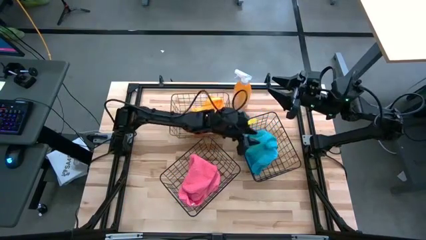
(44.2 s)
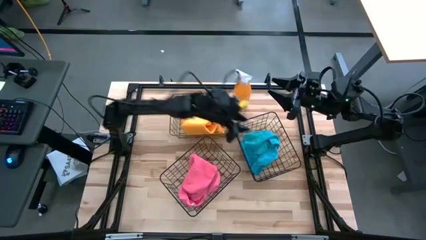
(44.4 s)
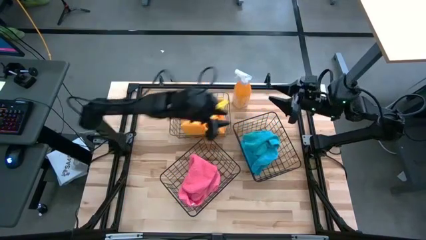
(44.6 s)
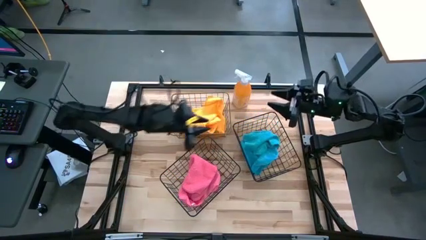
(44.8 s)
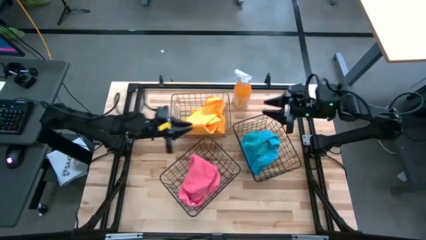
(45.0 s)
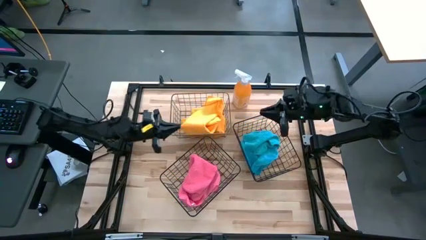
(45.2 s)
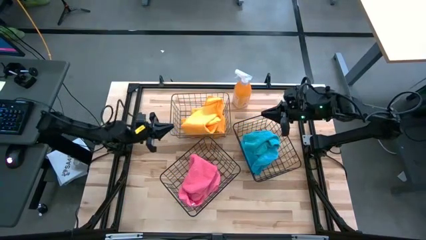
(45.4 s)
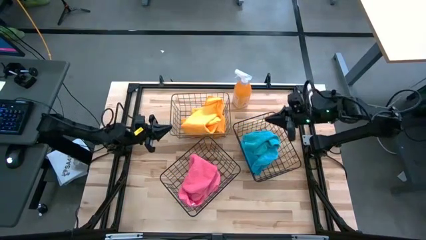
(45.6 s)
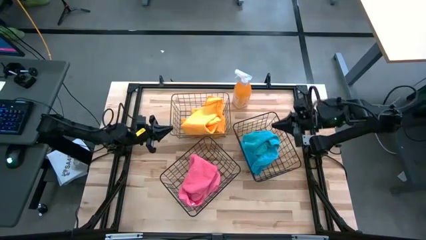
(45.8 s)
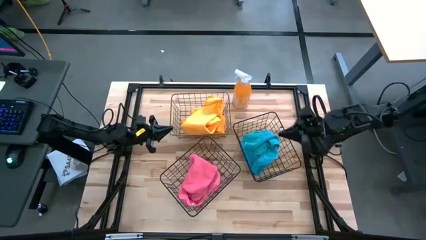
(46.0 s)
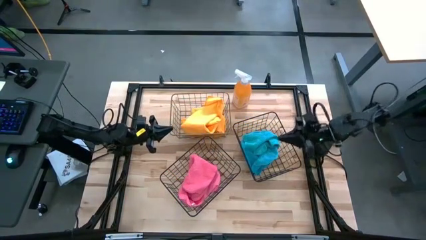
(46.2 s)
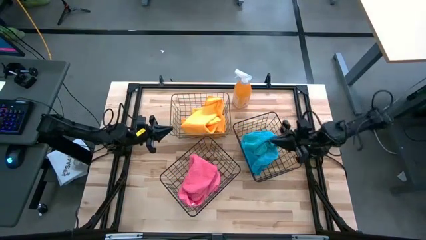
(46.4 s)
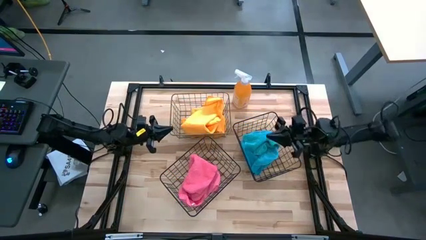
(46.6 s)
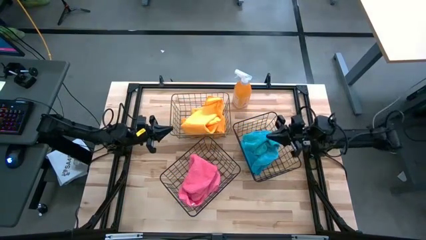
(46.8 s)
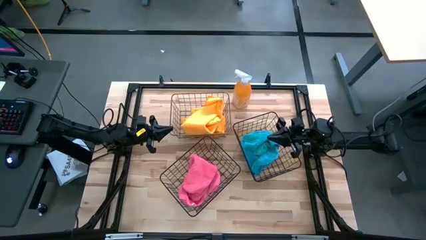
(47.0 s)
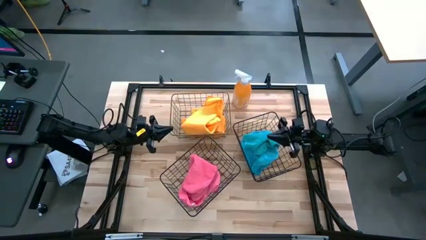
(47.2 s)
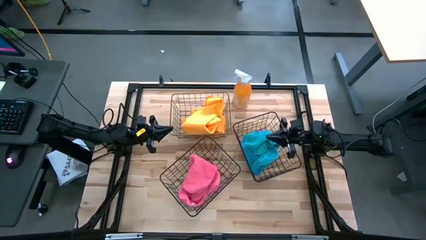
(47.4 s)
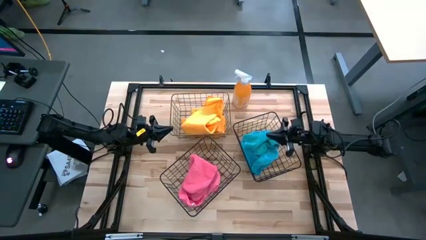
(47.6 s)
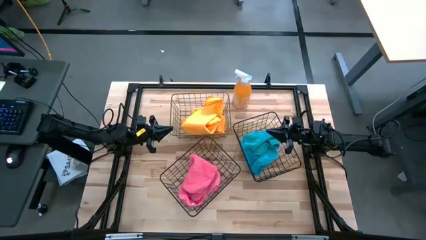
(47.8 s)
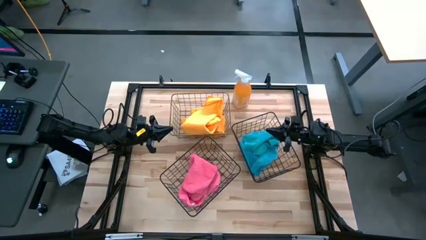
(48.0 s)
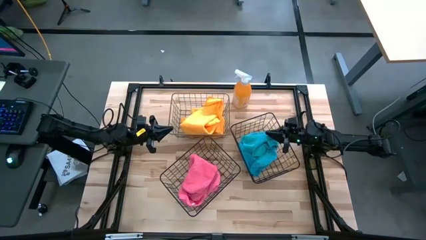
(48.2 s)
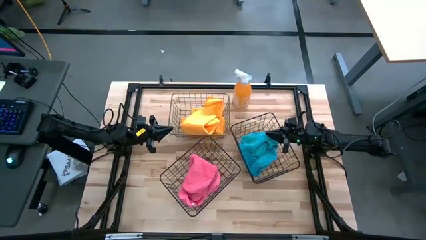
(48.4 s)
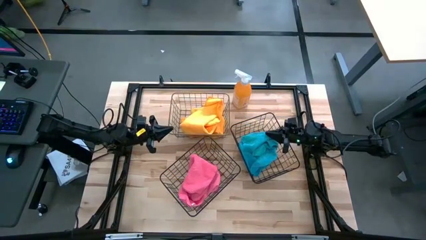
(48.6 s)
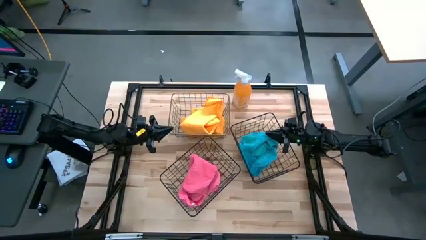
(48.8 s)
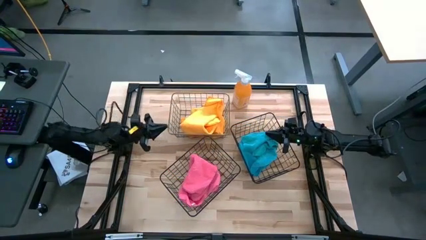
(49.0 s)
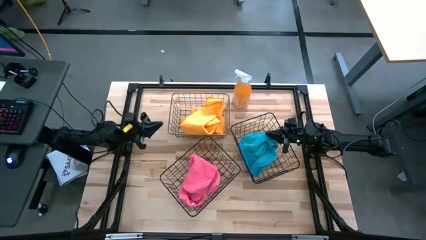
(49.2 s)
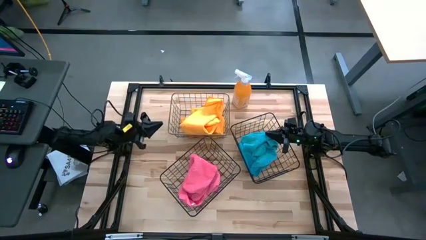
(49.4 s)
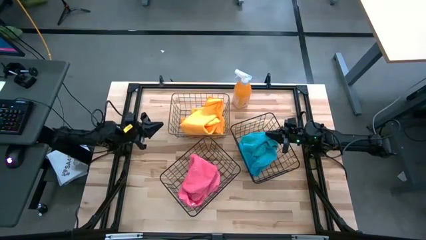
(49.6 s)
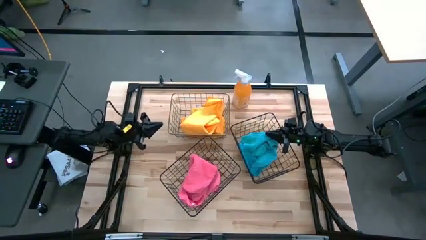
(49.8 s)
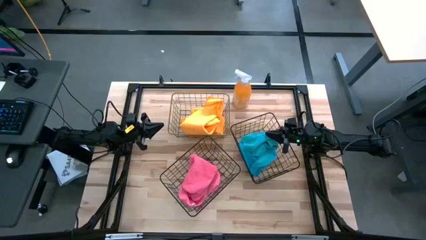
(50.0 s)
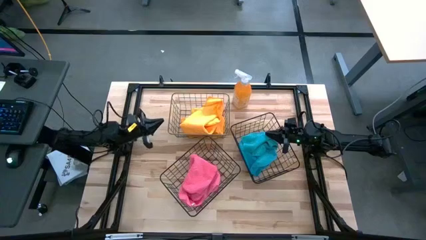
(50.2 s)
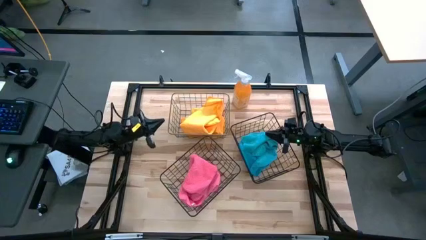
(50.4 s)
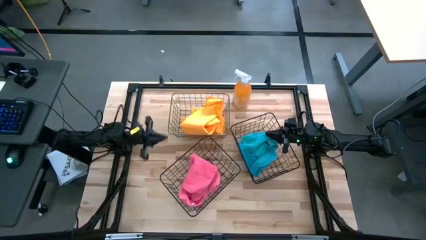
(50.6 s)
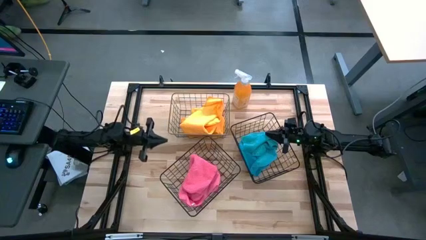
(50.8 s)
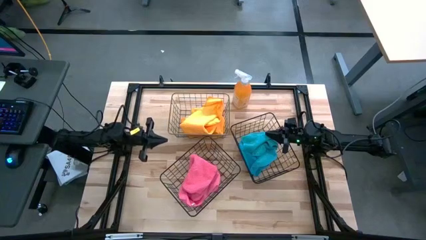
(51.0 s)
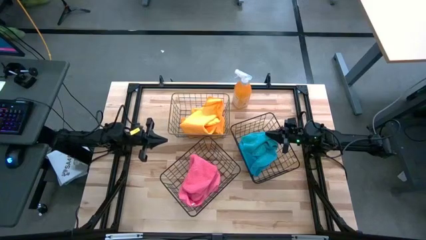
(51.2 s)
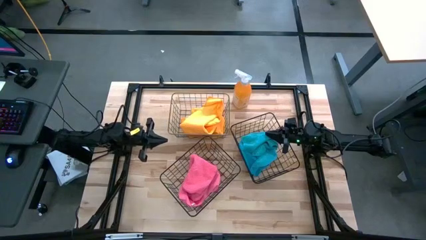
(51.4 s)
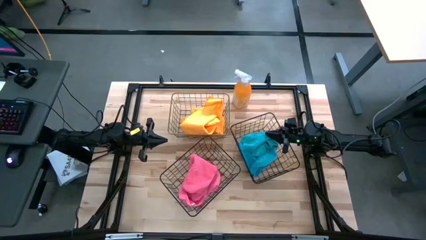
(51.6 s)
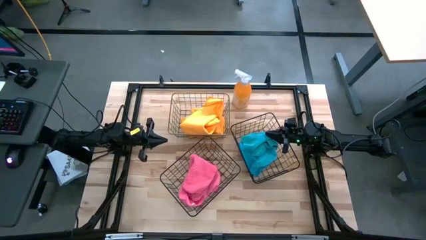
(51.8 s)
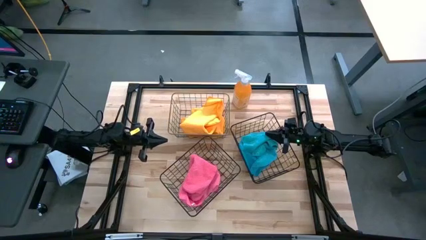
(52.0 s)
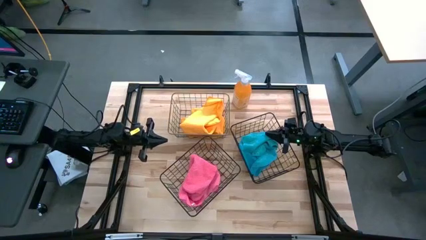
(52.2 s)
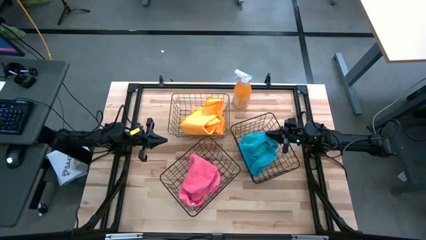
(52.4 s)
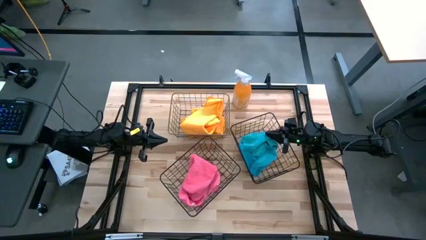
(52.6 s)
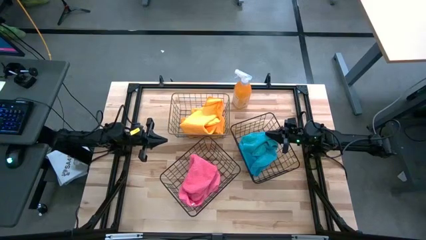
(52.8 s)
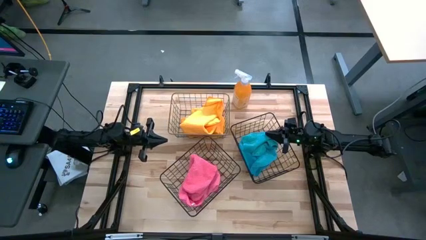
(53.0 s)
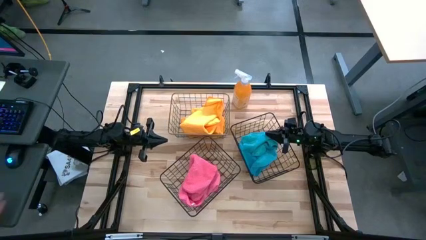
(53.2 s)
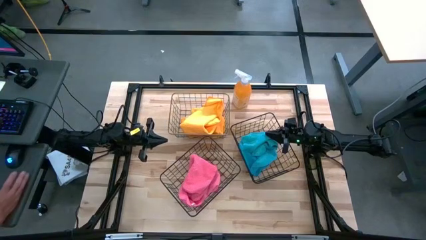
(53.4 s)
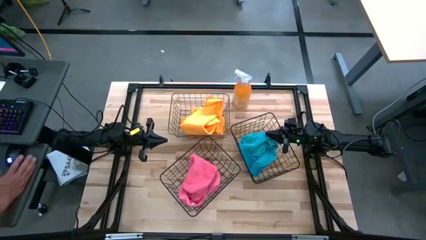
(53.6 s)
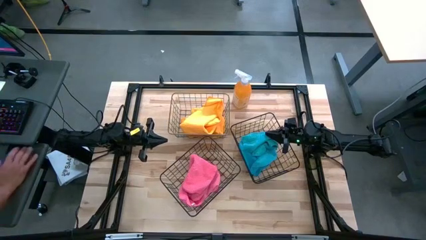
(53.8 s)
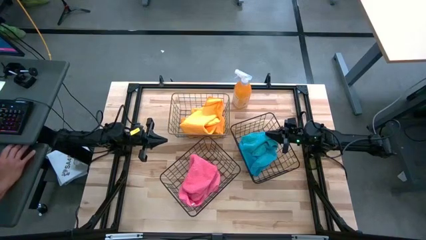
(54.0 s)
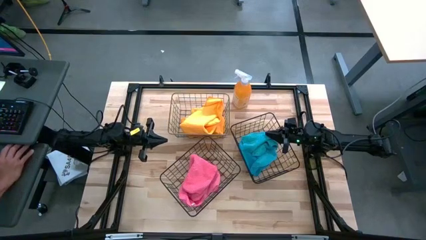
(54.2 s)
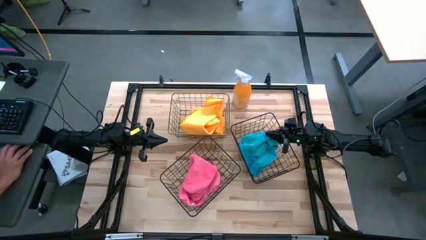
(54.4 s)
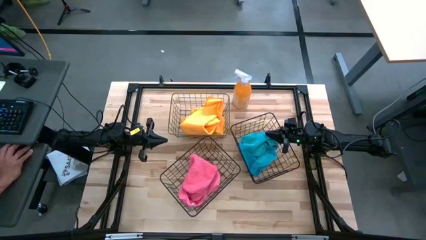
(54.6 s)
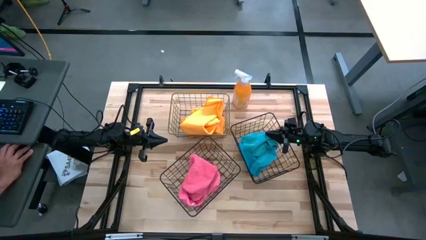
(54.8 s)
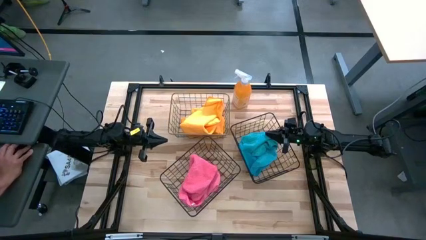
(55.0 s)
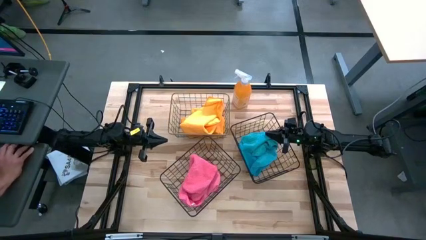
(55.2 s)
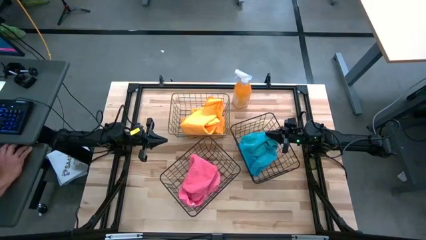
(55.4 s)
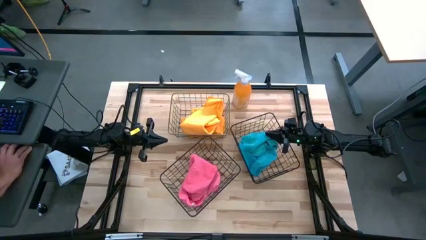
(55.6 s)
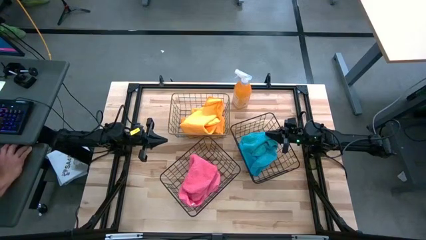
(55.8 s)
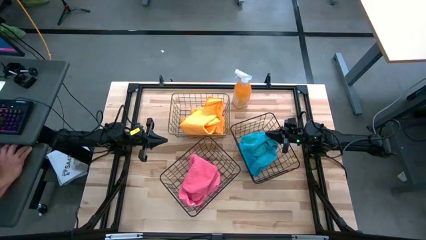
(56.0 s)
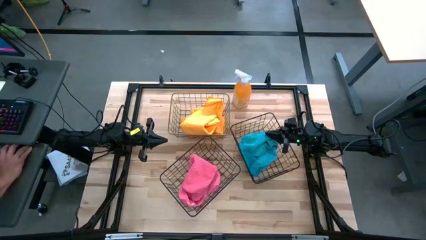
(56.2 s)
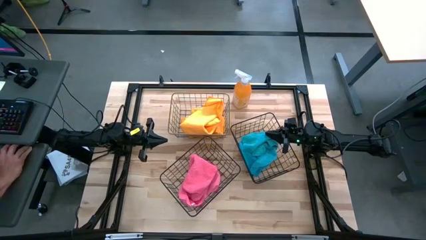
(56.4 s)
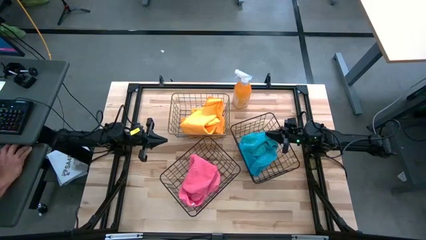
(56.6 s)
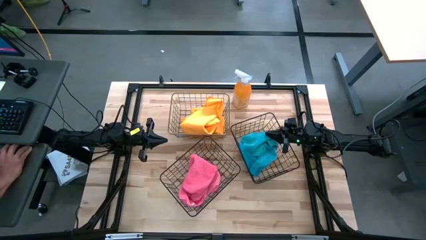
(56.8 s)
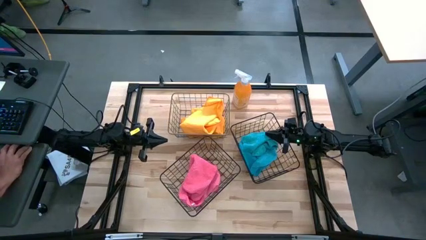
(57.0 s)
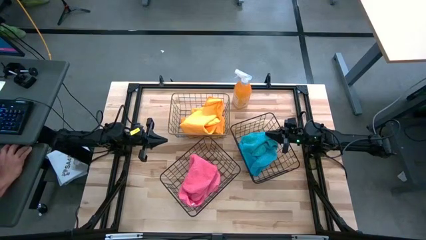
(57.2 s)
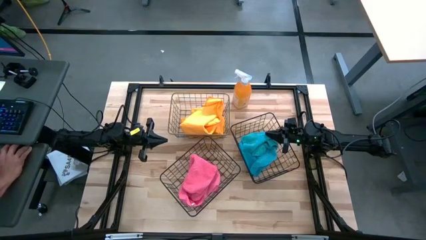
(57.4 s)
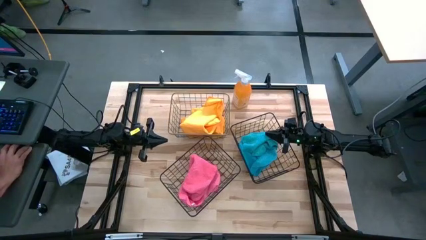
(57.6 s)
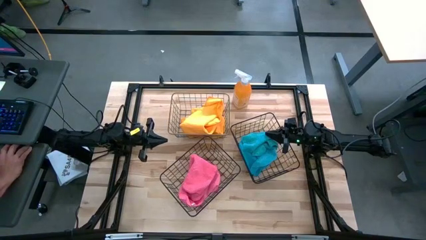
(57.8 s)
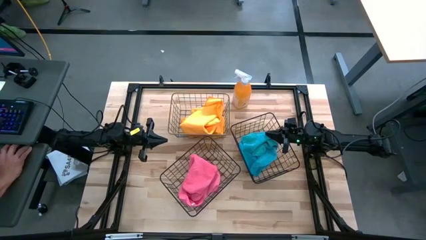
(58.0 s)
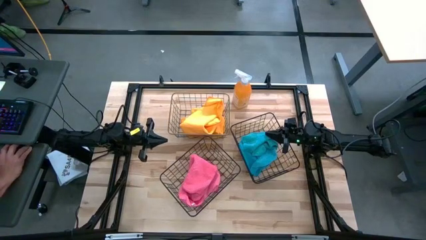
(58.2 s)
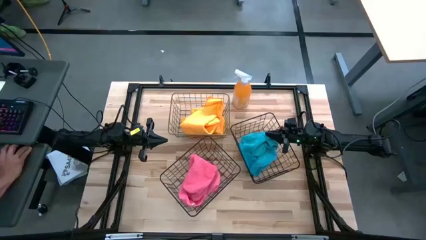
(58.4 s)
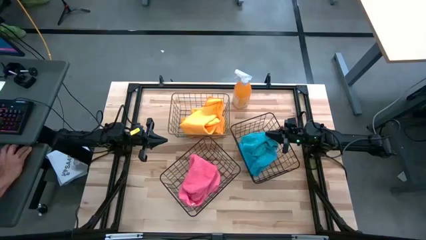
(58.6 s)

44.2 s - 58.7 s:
Task: Sort microfiber towel by color & place in baskets
Return to Home Position

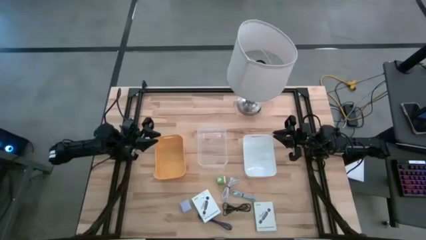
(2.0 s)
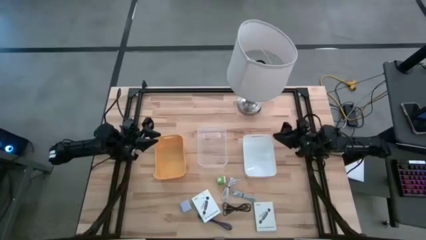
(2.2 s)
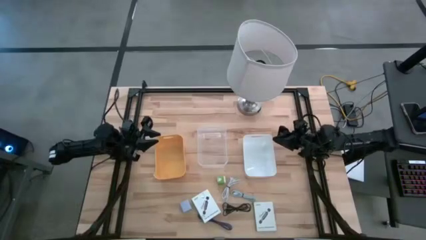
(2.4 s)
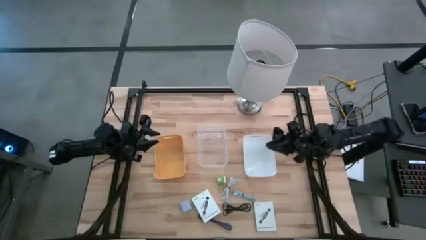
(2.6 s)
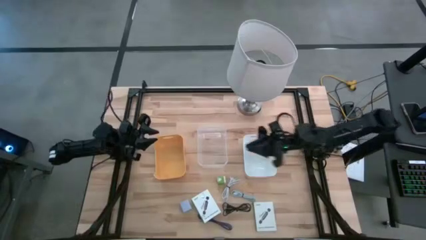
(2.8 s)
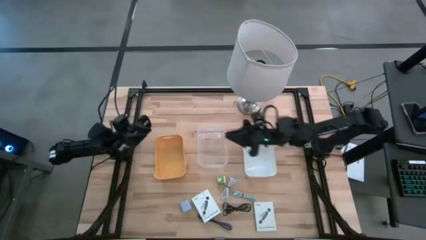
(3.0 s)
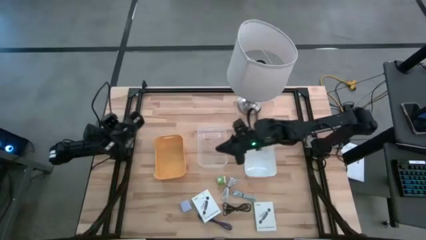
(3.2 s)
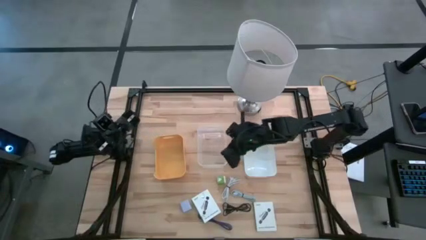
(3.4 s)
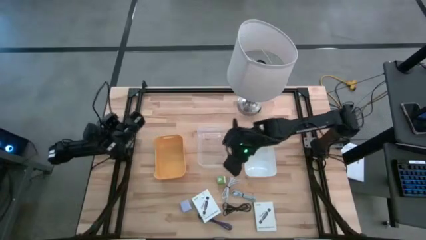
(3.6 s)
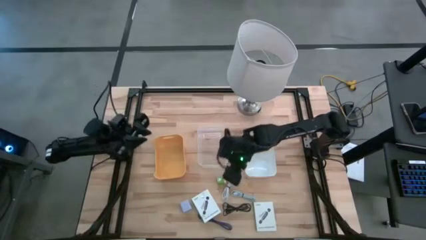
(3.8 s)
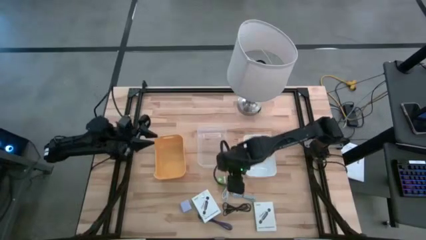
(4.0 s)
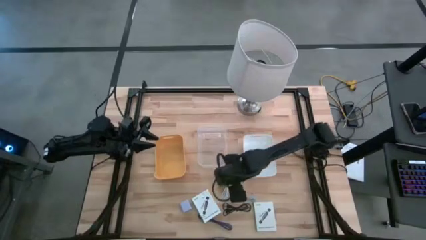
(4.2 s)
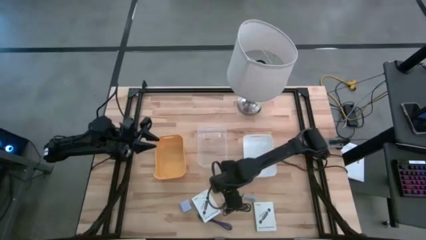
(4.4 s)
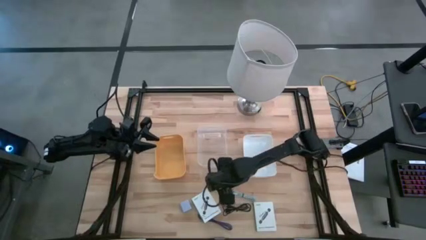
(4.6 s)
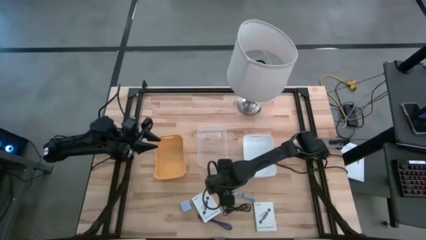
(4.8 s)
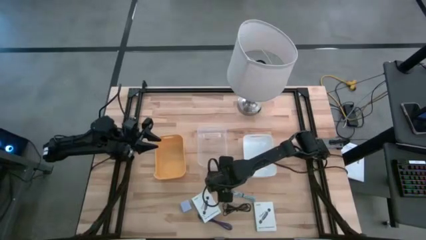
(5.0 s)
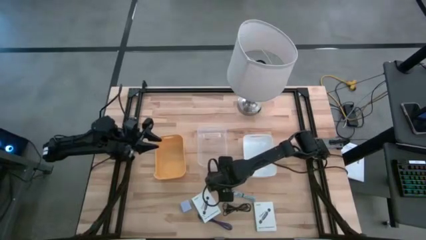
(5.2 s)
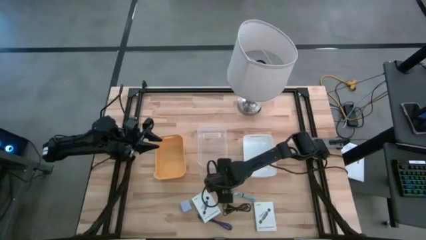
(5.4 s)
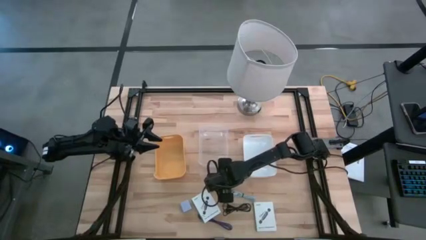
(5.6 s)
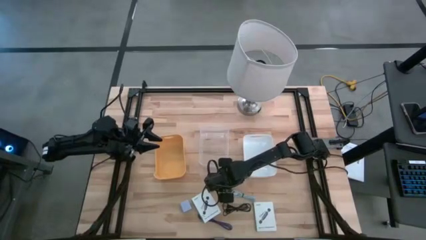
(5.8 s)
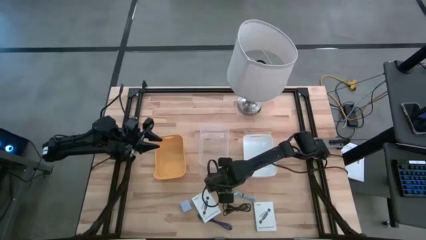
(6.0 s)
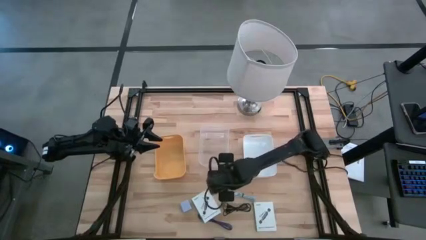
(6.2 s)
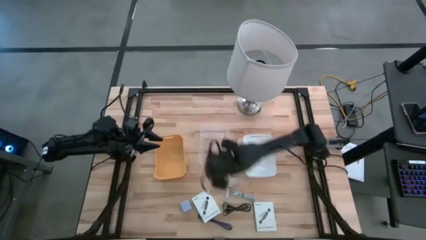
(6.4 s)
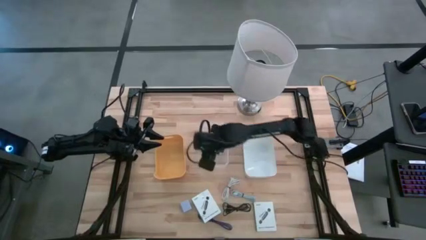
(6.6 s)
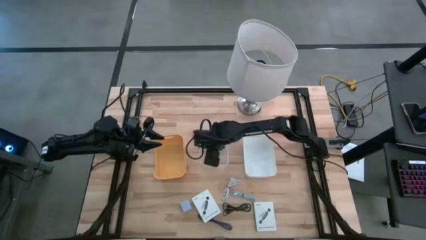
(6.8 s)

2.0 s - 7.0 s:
Task: Pick and place items into bin
Put the green charger adapter into the transparent bin
